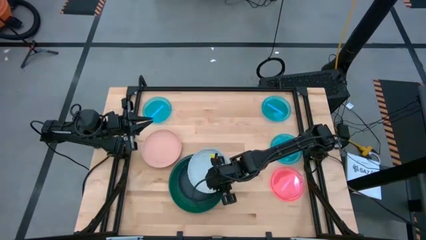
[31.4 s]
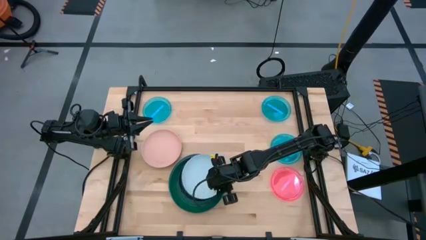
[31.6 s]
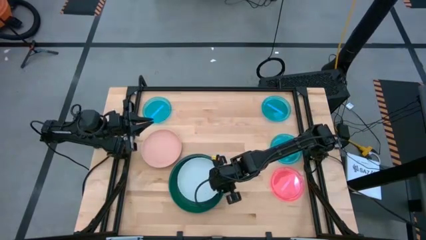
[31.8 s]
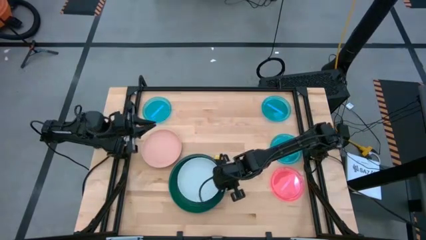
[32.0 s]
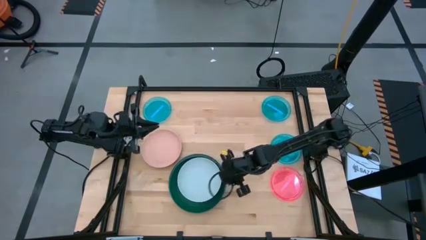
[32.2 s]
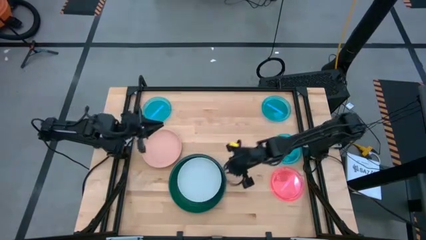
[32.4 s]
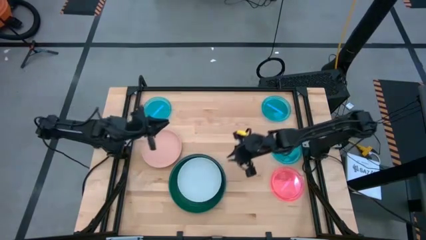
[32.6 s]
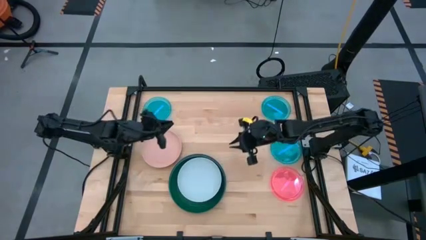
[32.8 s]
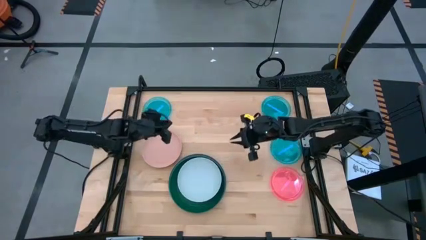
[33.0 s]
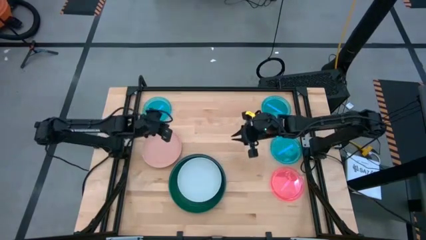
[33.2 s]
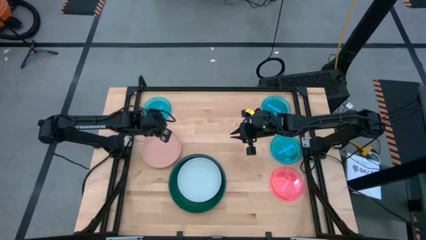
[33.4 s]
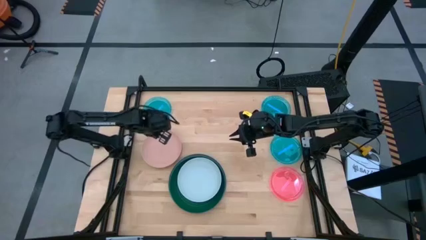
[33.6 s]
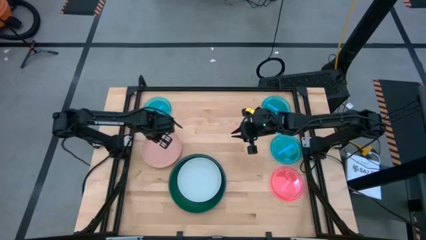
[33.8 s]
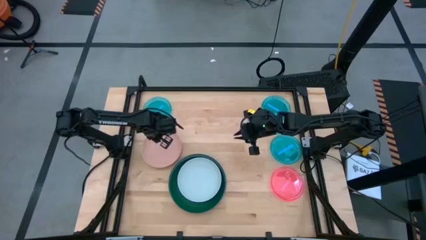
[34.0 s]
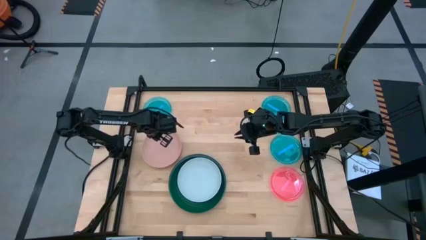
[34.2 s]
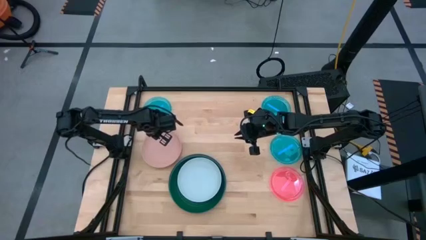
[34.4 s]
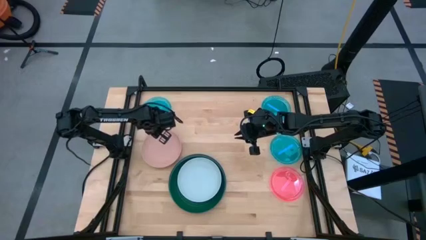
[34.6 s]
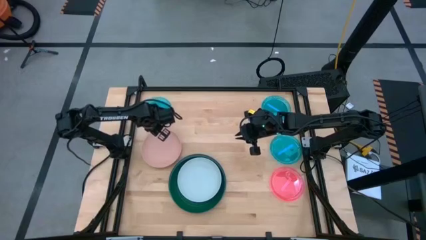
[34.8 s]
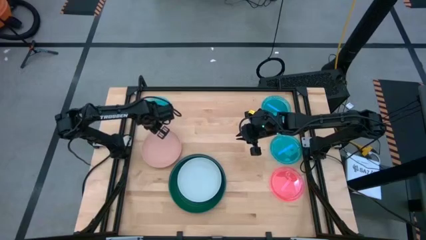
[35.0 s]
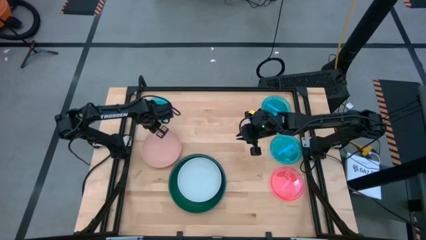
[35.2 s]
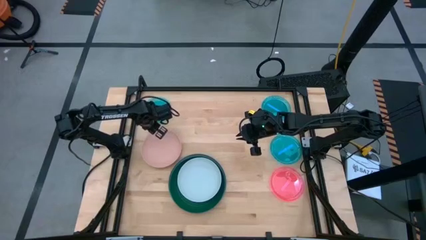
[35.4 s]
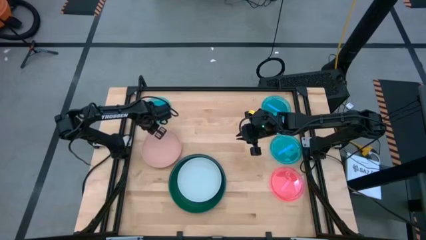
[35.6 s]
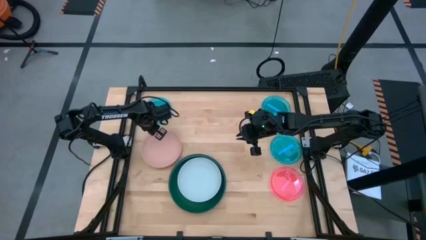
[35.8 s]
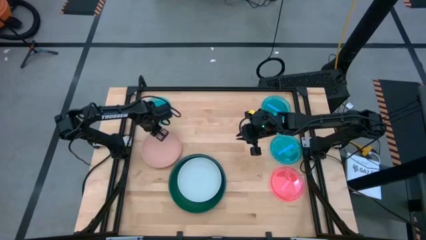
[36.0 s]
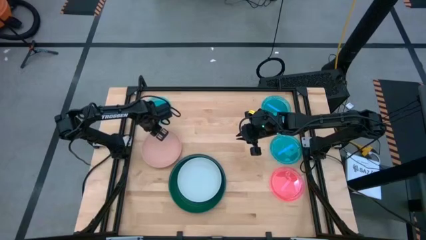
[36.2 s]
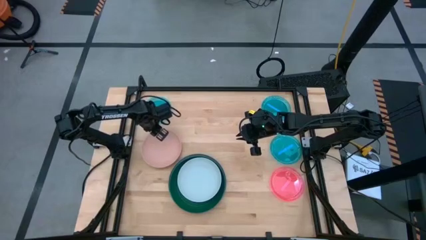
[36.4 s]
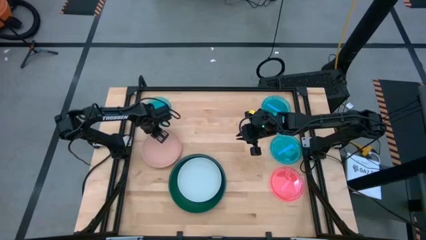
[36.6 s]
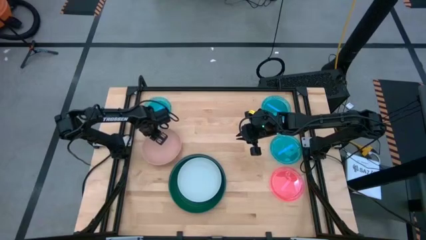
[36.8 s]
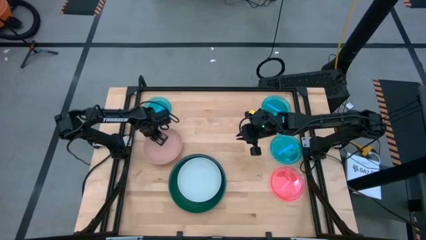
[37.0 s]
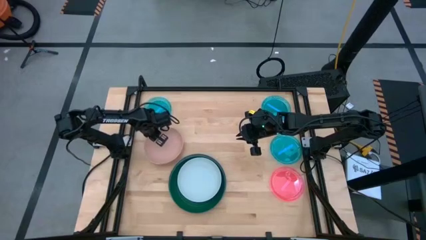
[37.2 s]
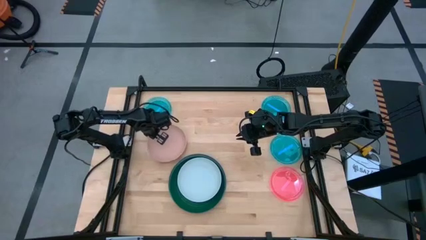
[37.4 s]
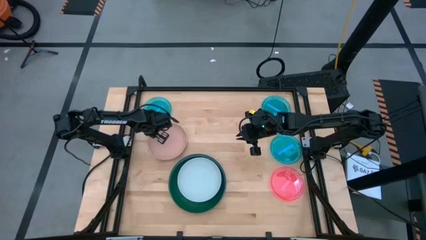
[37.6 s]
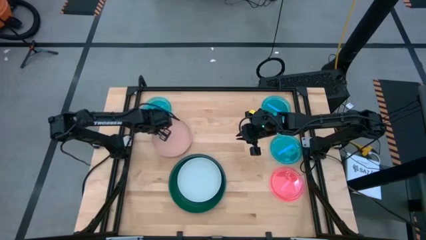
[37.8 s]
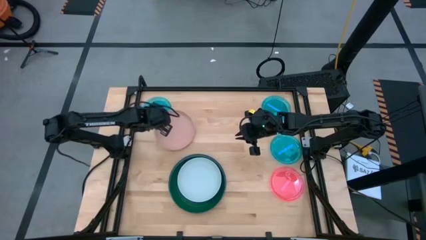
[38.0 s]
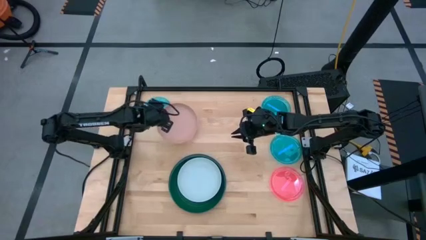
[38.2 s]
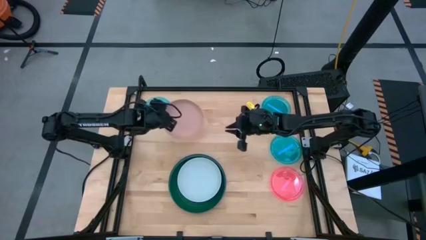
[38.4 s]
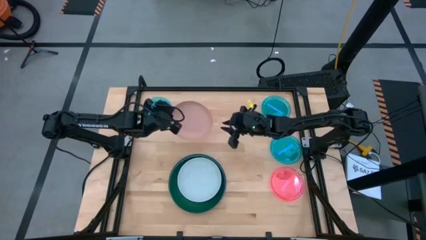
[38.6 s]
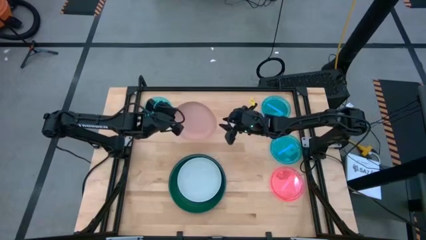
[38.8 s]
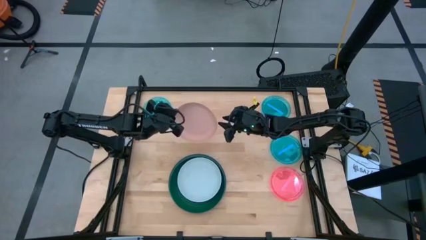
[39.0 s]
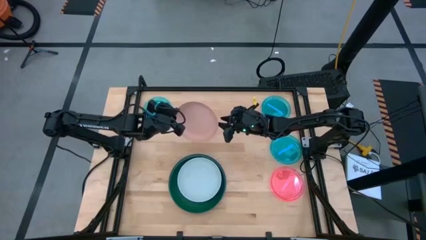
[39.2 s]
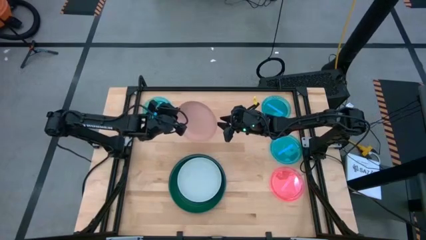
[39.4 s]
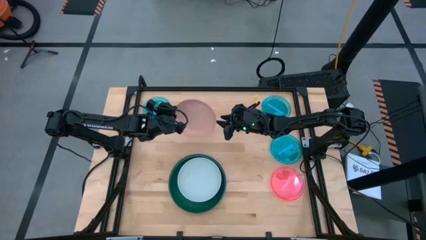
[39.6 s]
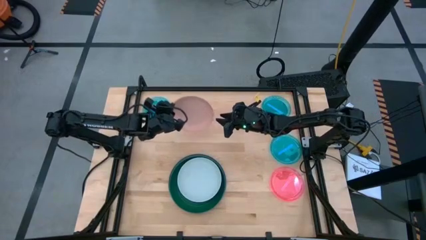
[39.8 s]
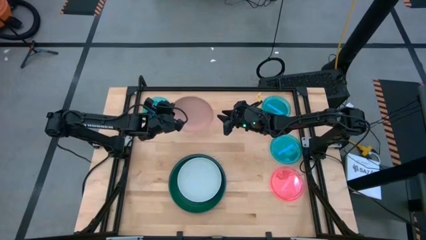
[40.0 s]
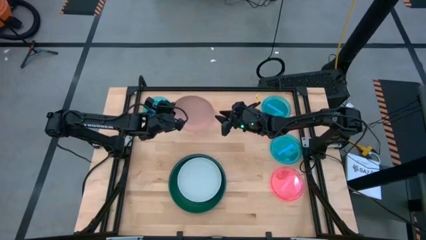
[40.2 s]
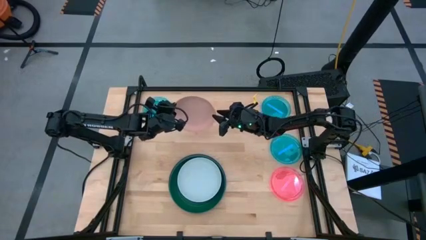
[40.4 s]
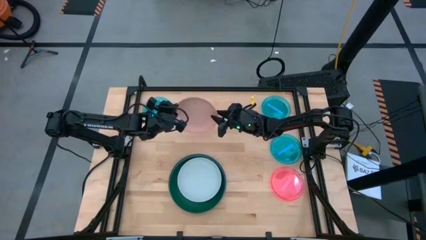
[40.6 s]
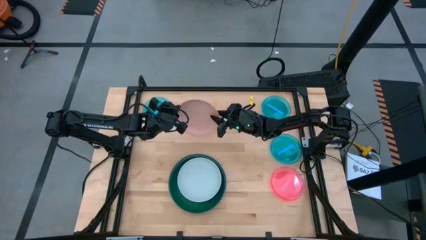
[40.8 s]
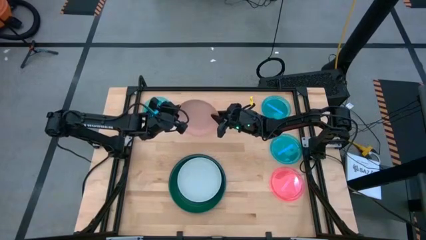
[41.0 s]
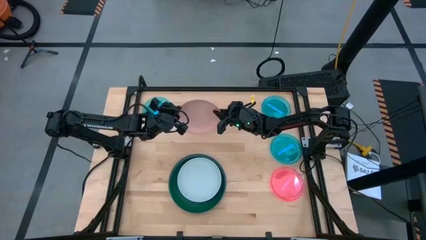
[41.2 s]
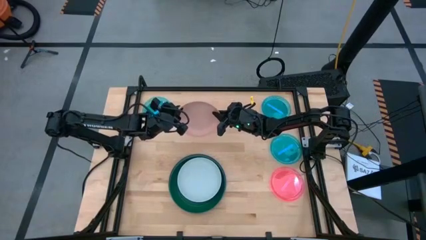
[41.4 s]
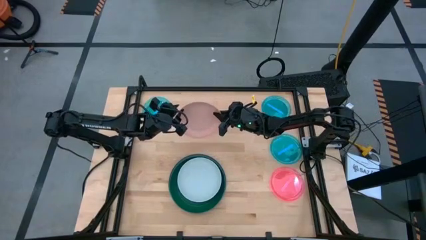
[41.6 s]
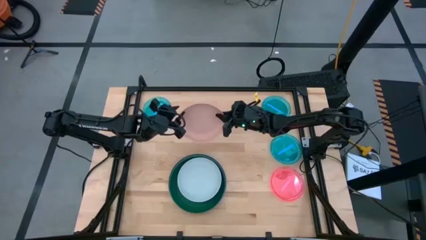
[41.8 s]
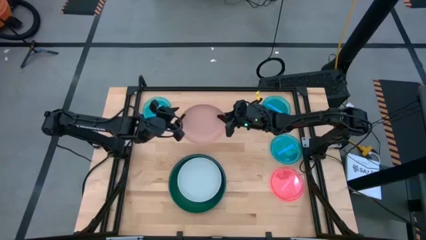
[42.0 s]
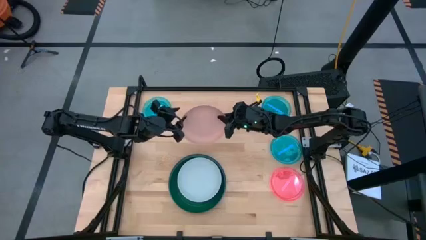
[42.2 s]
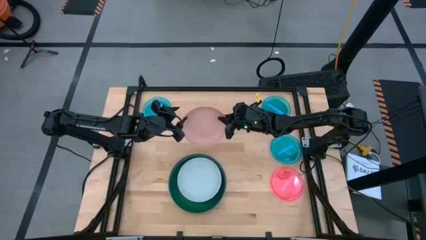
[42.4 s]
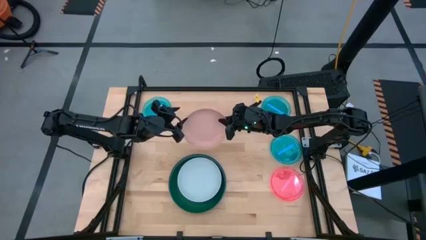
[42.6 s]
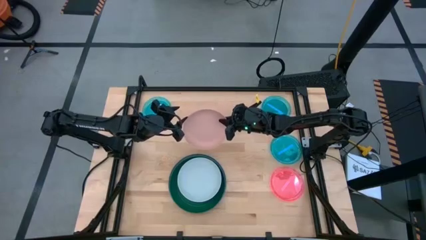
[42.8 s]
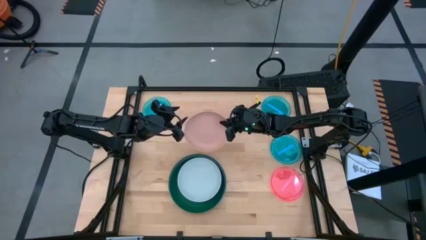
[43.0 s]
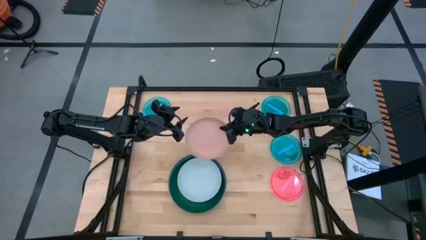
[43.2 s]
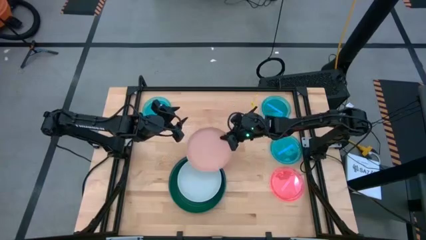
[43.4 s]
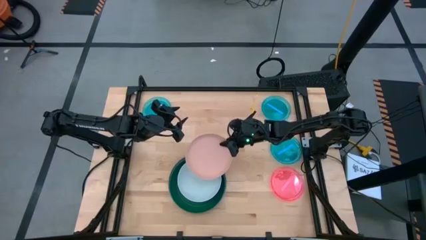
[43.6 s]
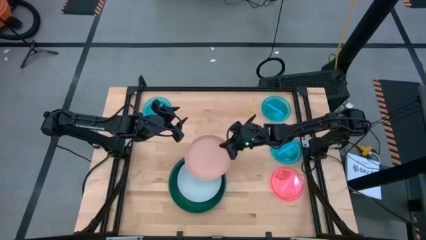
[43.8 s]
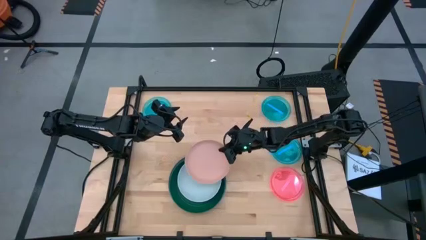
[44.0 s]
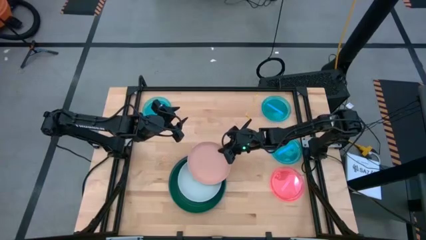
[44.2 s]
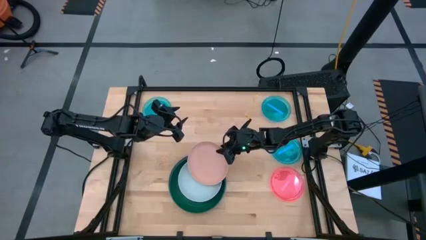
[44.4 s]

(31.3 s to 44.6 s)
Task: Stack plastic plates
Stack the light orange plate on top of the light blue plate

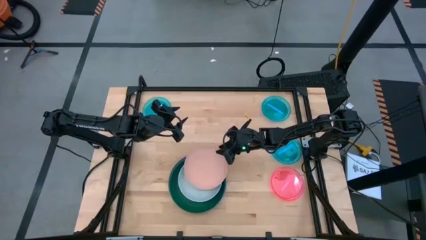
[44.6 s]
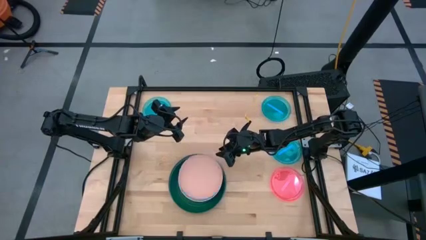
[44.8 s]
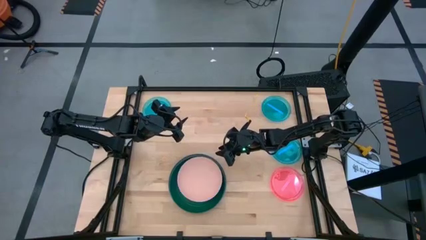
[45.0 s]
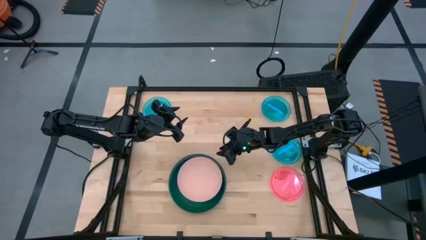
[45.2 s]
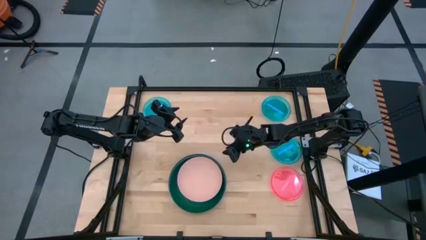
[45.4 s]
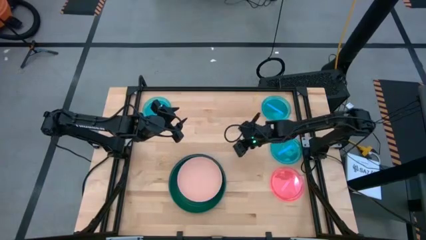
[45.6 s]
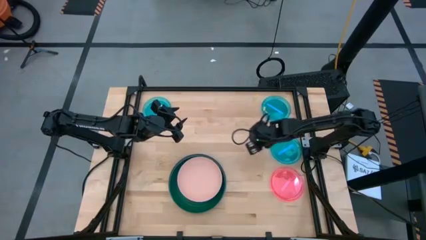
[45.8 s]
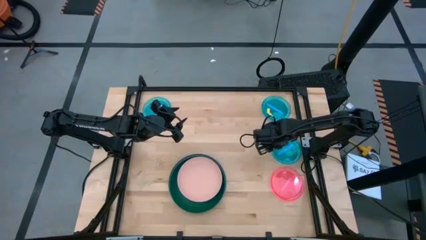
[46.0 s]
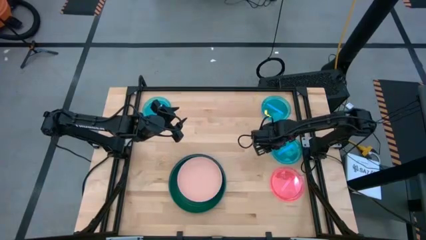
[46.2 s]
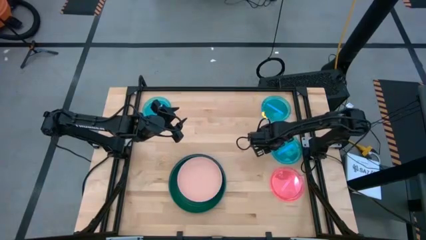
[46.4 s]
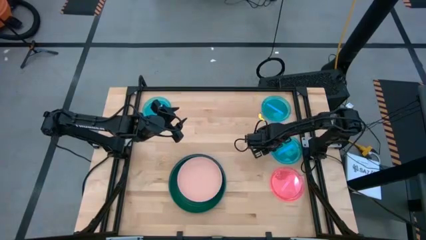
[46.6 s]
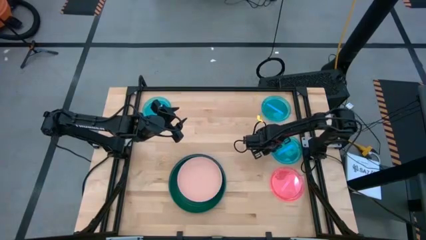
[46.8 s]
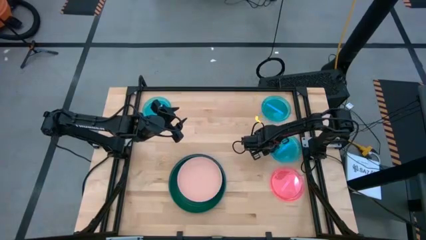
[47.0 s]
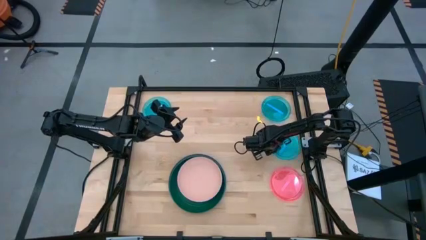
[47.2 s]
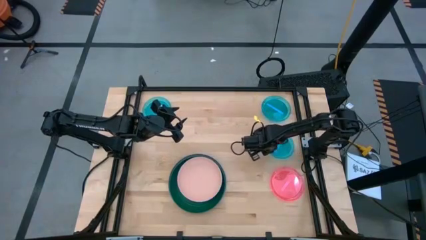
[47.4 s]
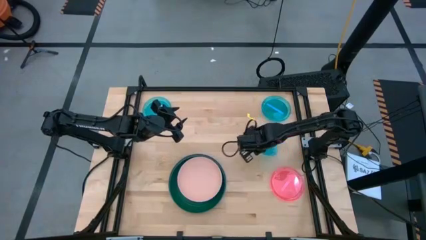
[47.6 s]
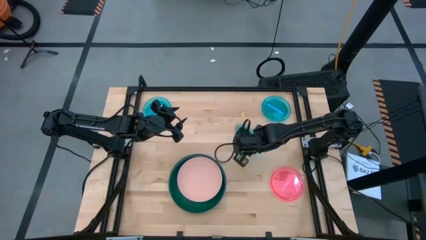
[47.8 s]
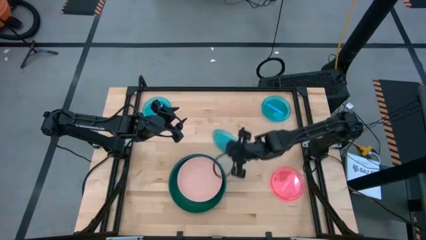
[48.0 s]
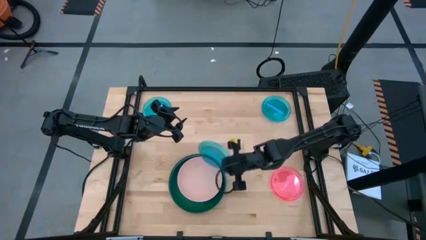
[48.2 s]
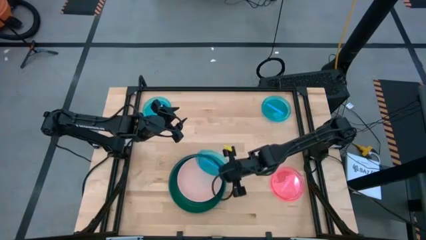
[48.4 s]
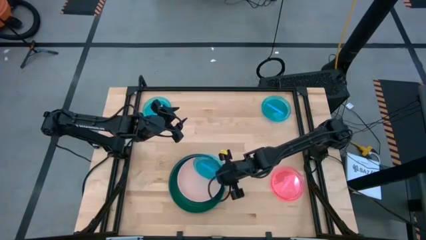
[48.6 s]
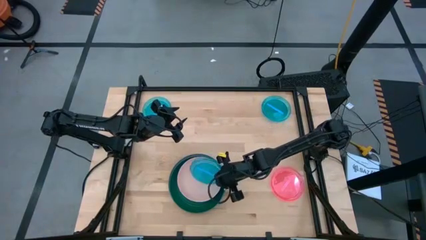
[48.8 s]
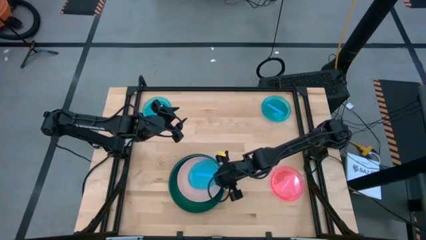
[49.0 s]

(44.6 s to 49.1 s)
Stack the bottom blue plate on top of the light orange plate
